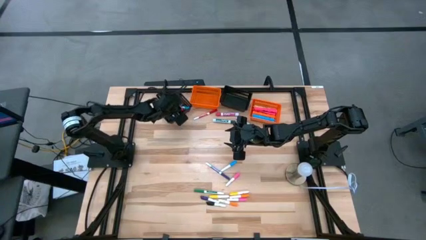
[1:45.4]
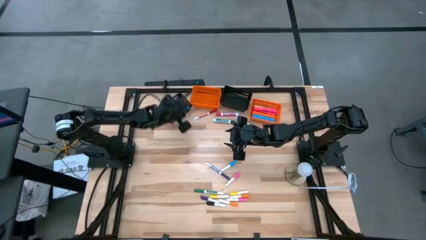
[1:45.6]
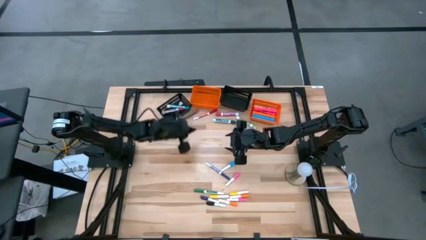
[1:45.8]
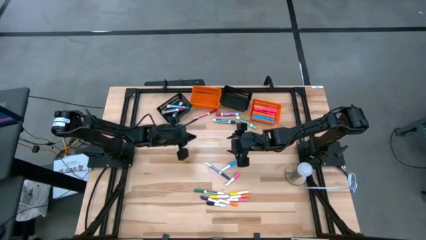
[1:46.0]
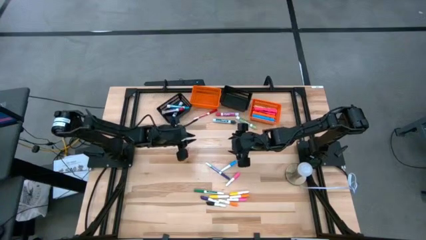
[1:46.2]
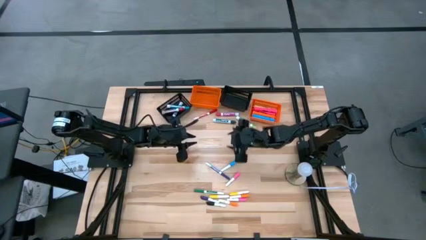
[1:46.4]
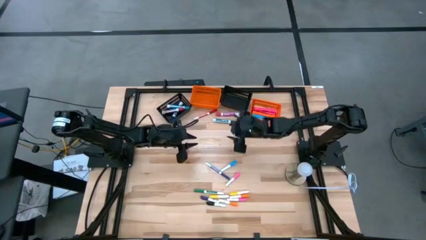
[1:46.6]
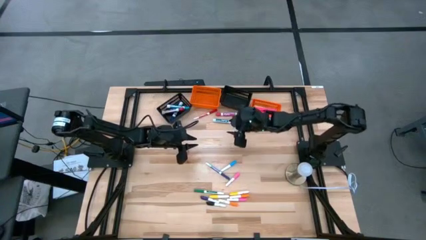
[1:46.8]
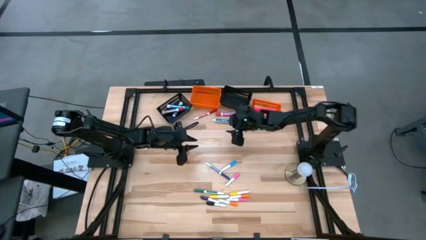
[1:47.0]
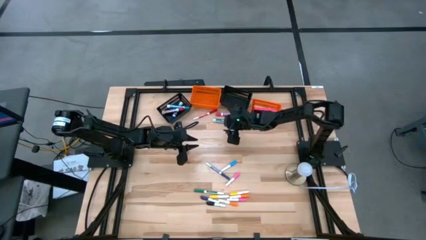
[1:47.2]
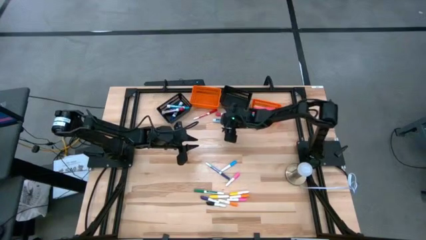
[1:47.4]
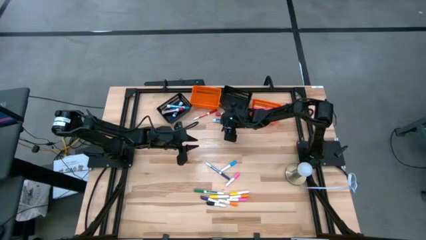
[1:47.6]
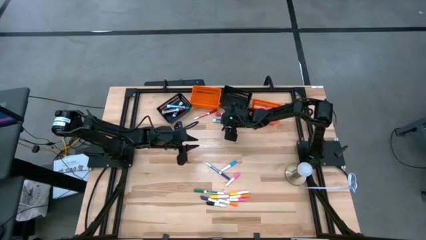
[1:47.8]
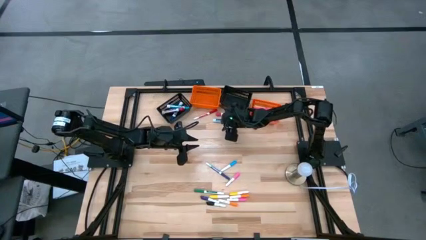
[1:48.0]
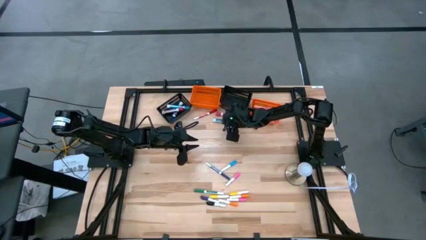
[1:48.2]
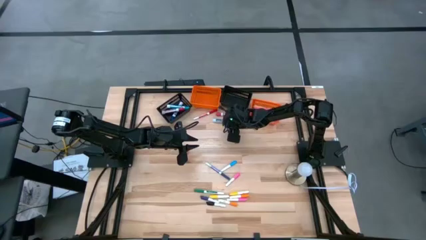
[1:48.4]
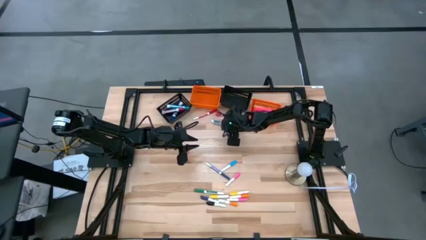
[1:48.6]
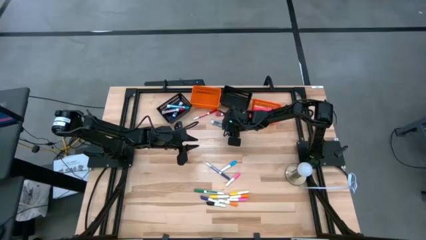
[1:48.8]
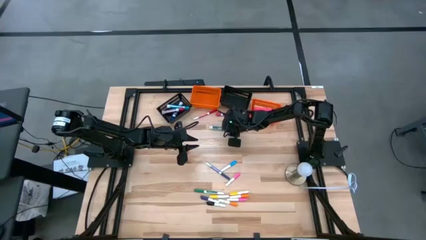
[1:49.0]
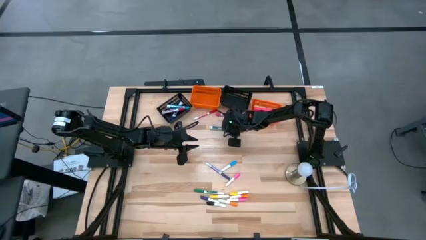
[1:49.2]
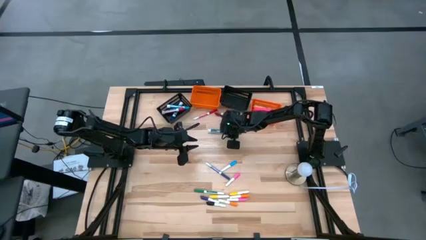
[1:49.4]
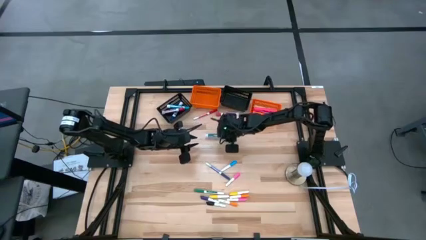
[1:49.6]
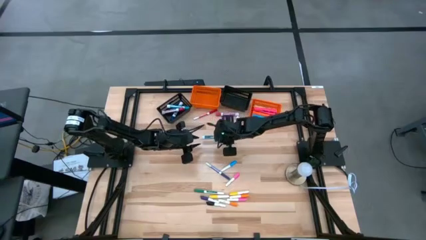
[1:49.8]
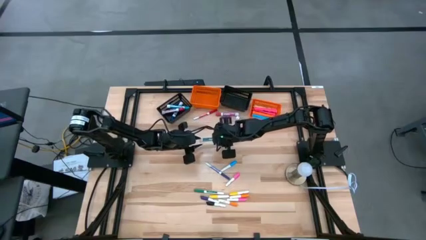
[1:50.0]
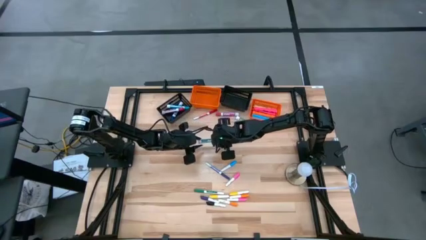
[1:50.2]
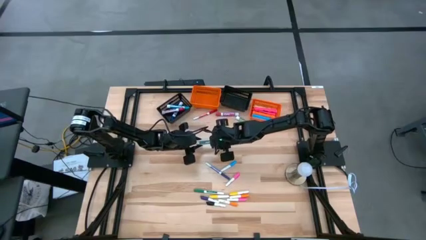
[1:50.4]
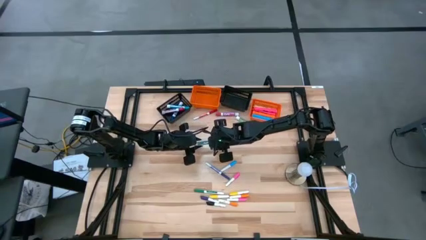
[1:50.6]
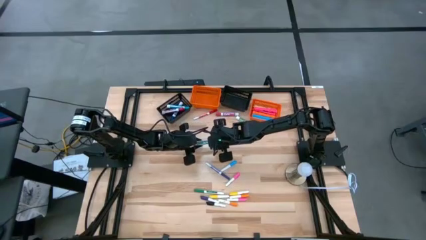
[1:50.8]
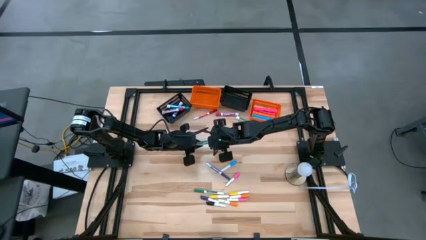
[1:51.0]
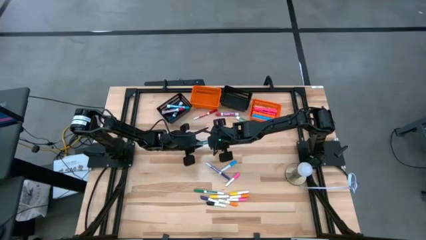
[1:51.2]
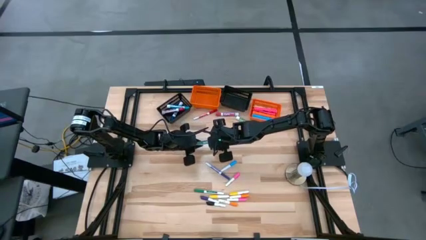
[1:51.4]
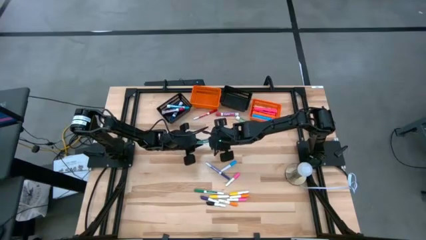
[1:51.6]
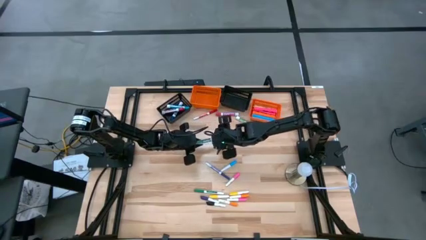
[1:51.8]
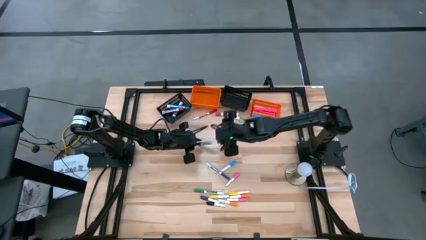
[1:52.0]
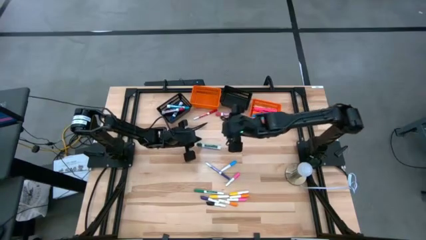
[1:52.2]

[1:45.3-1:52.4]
Task: Pick & Place Markers
Put the large green marker into the left black bin

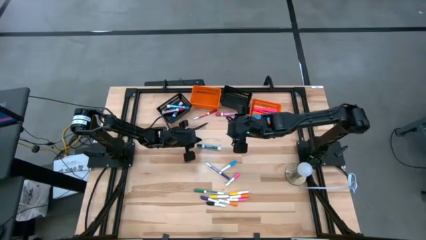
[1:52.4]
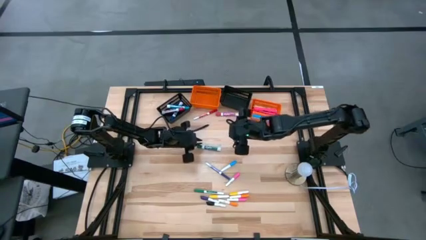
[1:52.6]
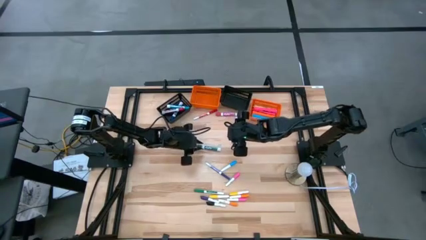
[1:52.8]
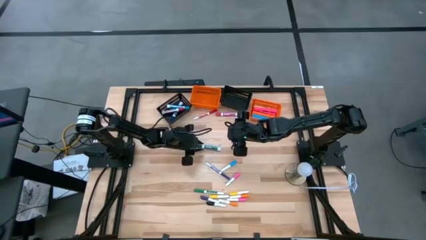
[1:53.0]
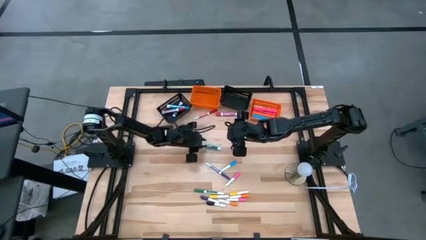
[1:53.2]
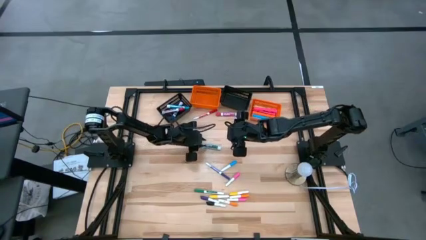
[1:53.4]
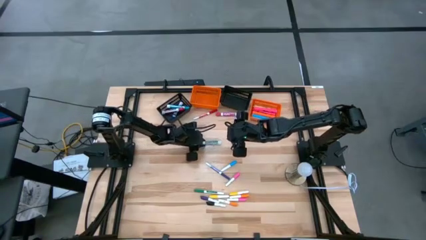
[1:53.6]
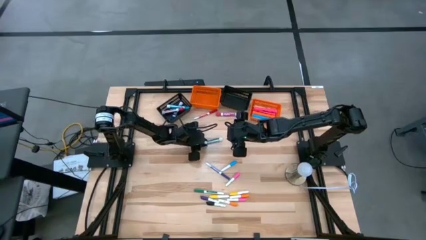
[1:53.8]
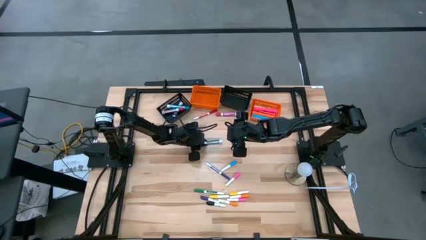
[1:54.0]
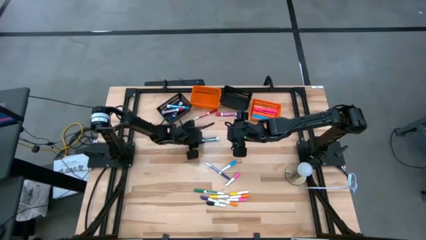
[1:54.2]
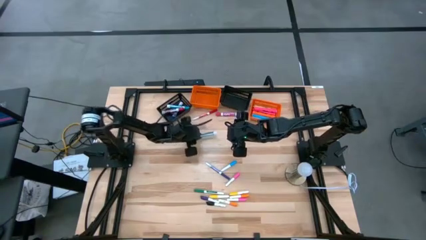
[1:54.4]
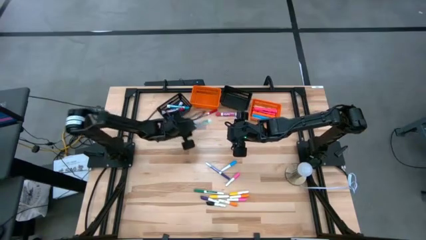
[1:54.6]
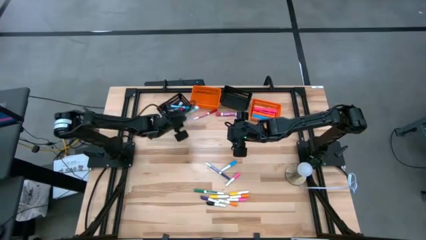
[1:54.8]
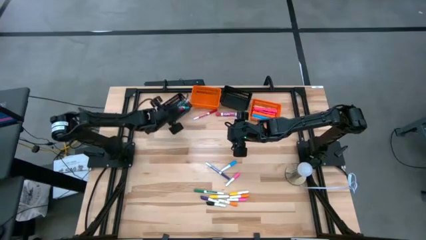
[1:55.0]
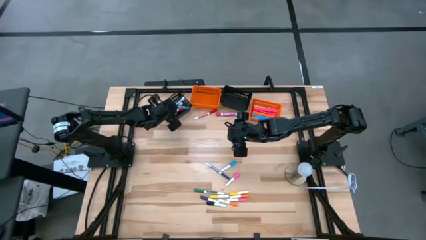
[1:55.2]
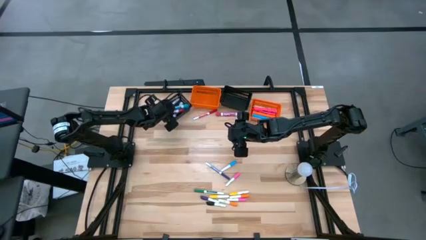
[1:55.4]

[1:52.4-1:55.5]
Put the large green marker into the left black bin

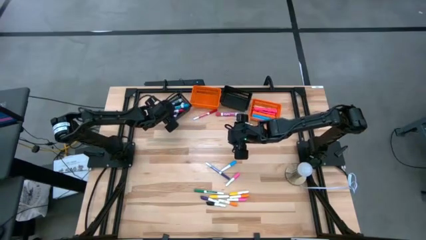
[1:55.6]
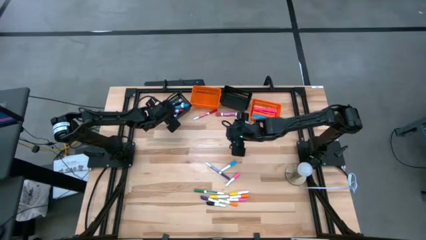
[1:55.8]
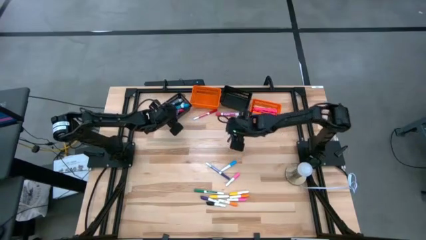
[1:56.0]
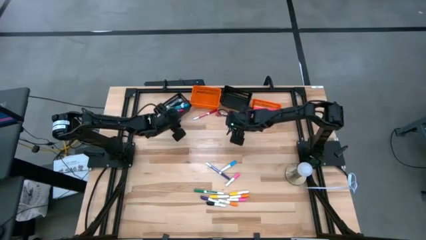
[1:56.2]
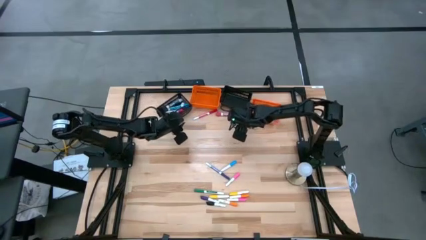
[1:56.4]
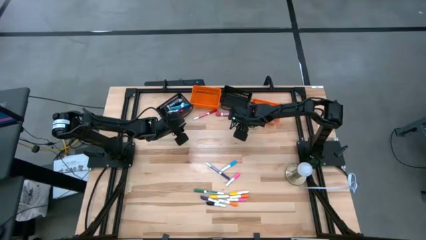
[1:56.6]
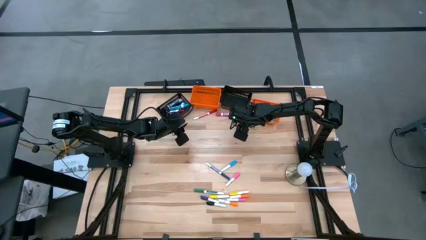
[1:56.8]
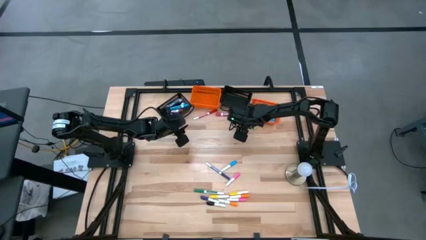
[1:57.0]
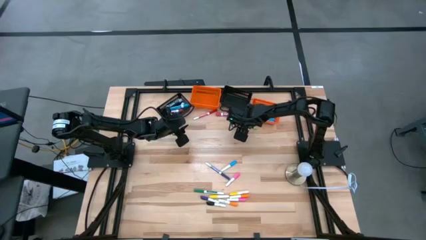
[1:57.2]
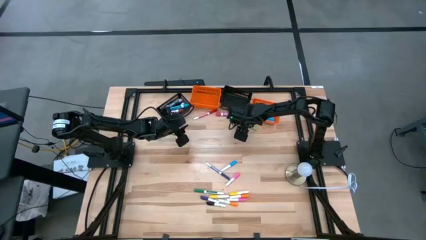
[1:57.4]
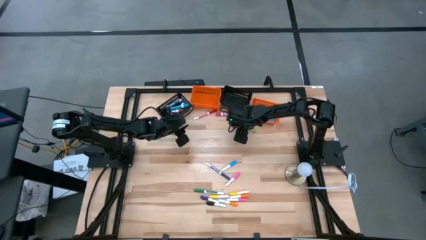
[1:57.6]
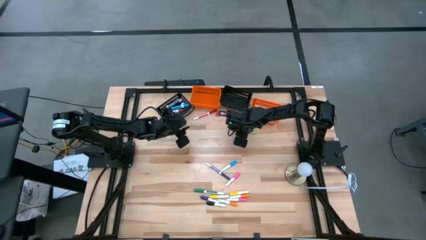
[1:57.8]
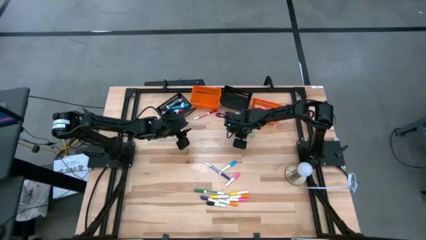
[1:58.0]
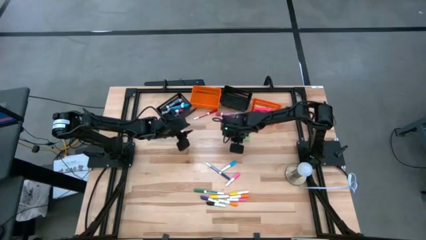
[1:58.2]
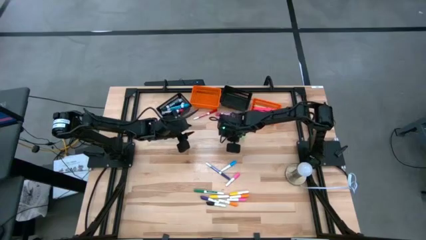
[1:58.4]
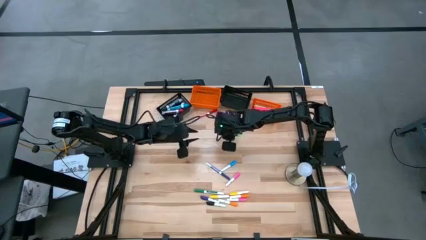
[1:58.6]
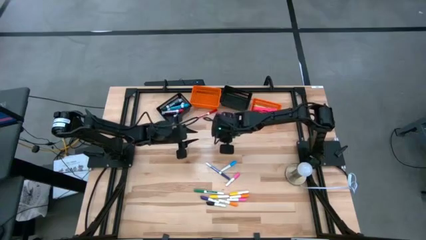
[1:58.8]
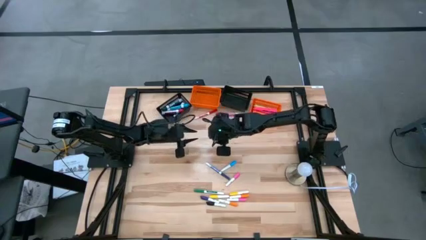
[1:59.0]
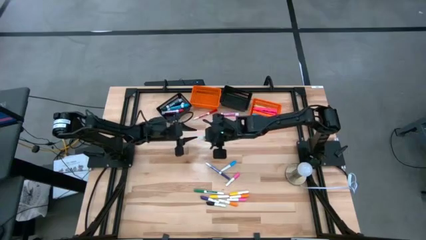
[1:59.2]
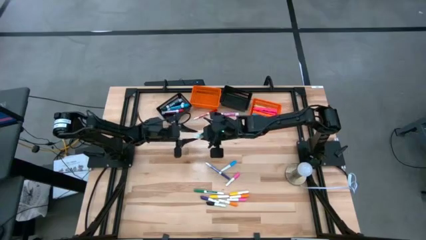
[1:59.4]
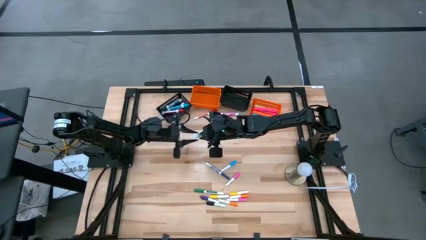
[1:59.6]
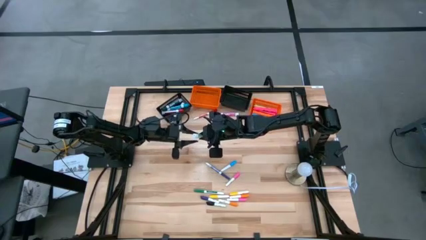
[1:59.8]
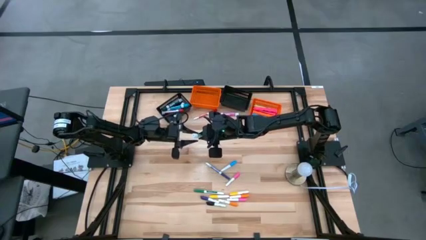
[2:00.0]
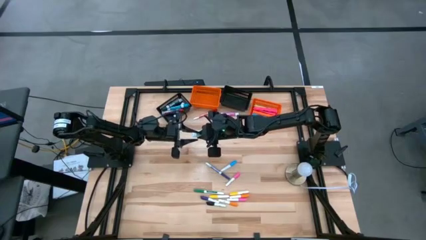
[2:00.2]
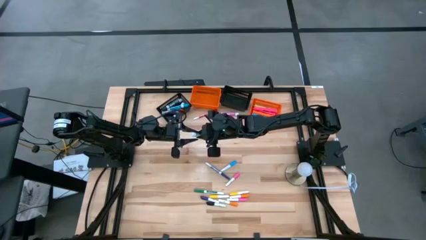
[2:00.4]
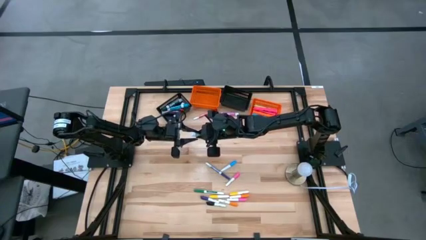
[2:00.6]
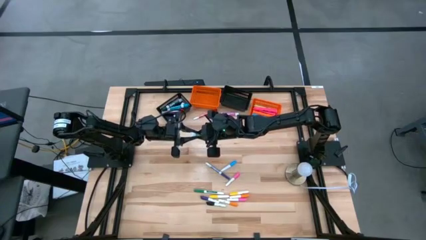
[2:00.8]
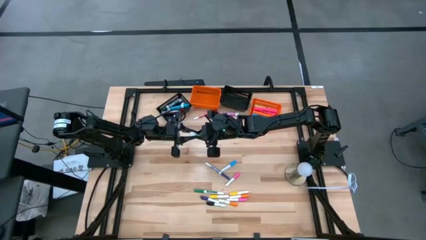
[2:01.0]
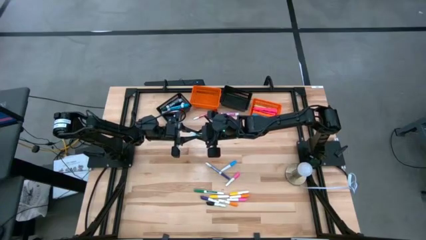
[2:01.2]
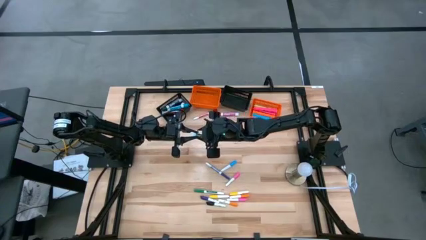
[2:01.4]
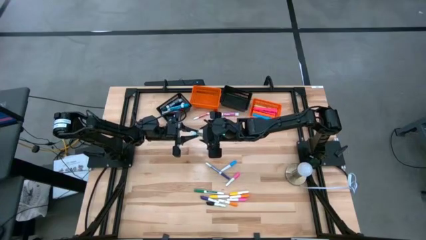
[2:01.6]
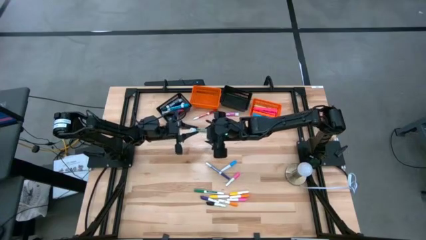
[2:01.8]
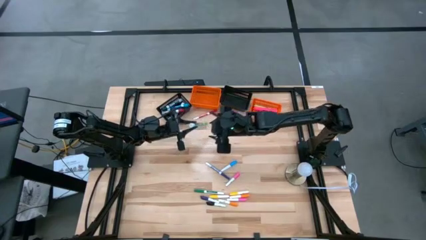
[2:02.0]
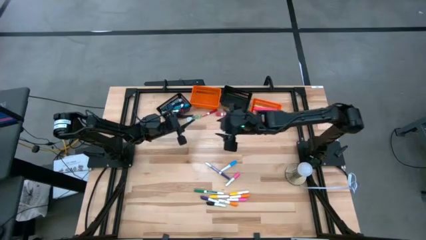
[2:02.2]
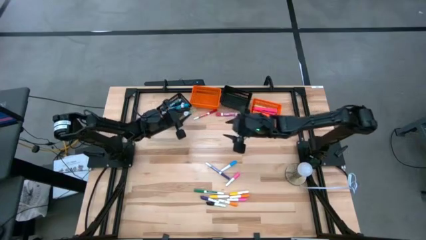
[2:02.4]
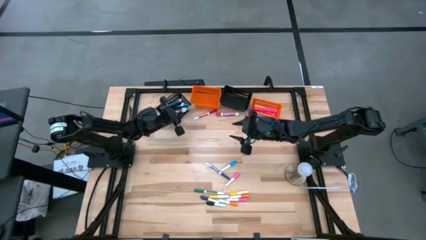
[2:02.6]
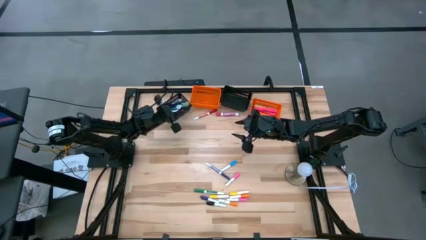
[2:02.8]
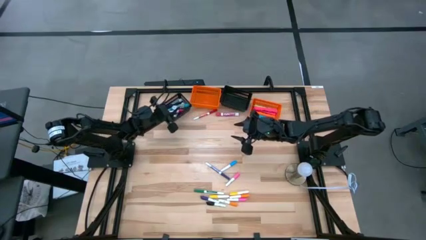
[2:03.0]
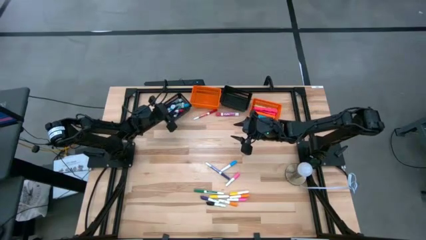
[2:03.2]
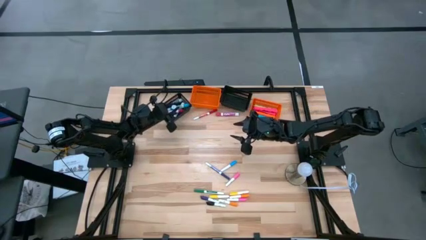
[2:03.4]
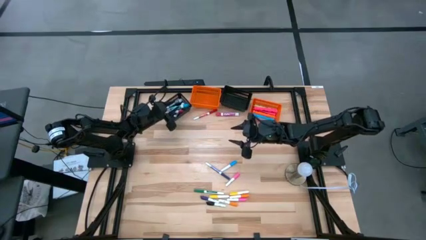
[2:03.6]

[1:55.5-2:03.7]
Put the large light green marker into the left black bin
